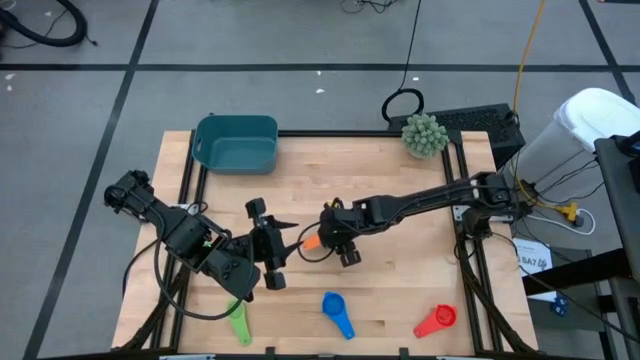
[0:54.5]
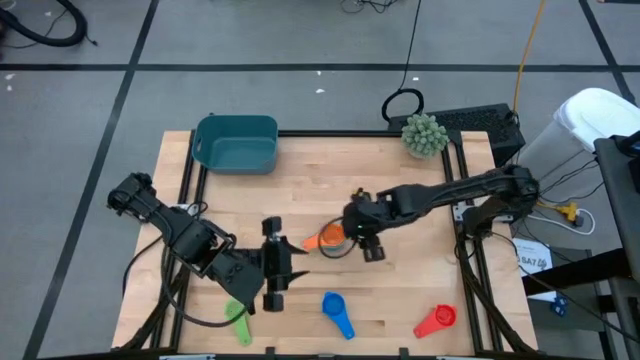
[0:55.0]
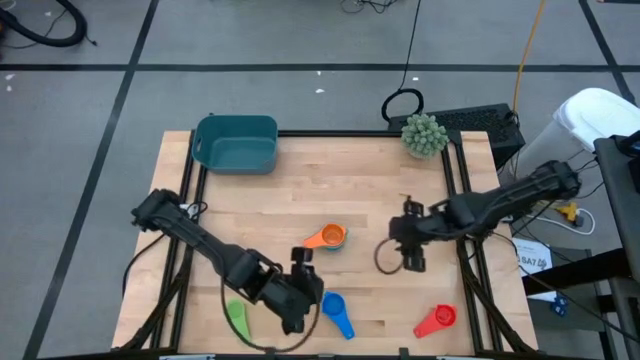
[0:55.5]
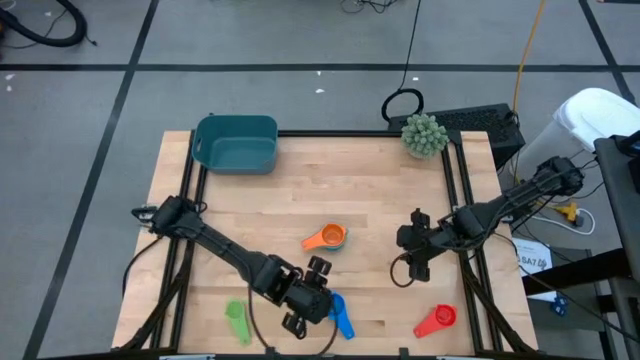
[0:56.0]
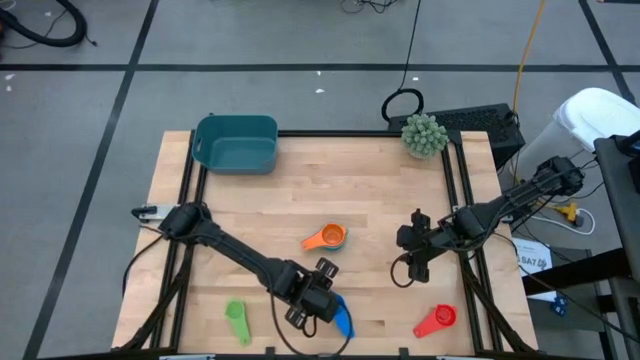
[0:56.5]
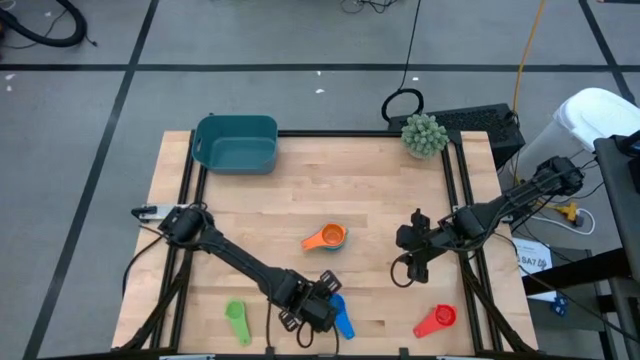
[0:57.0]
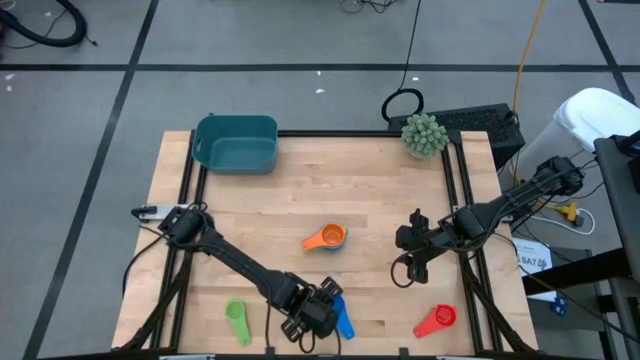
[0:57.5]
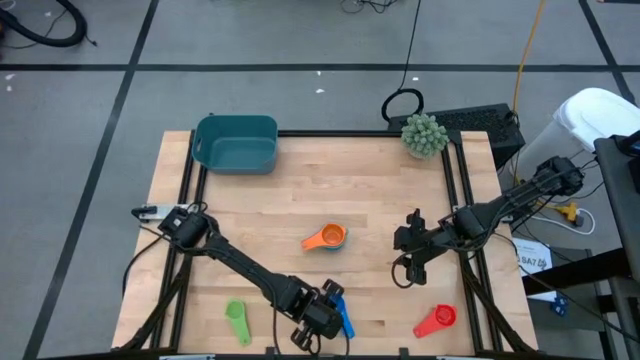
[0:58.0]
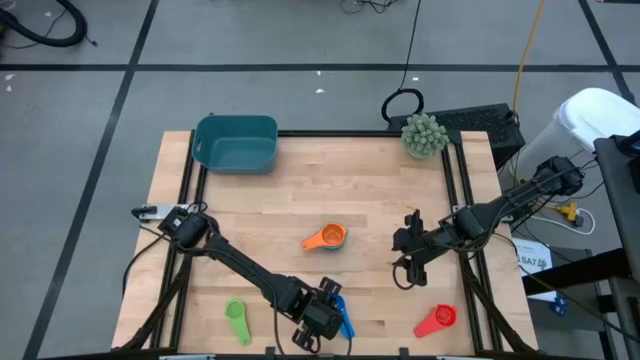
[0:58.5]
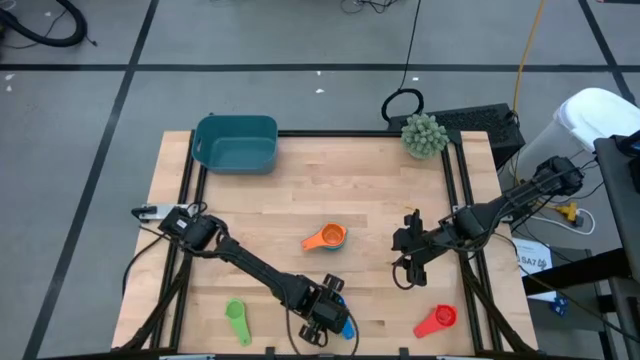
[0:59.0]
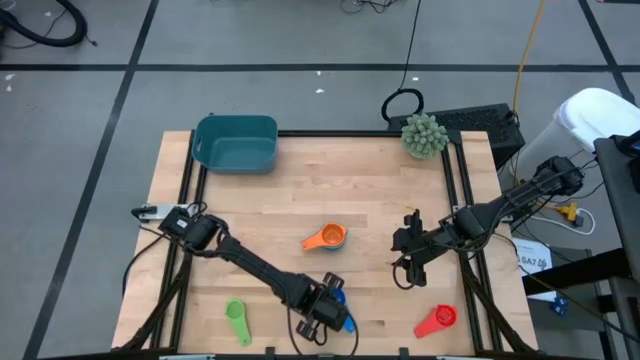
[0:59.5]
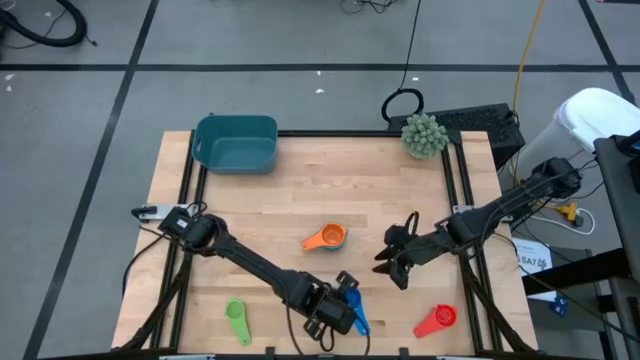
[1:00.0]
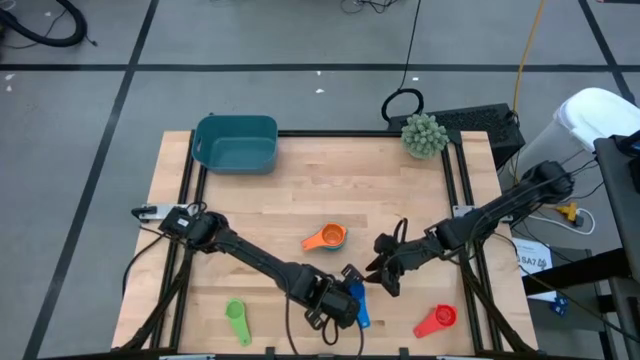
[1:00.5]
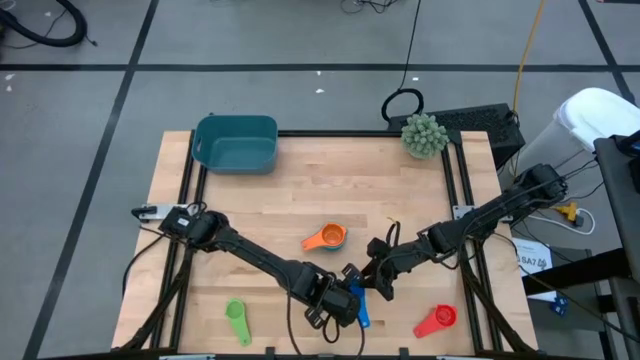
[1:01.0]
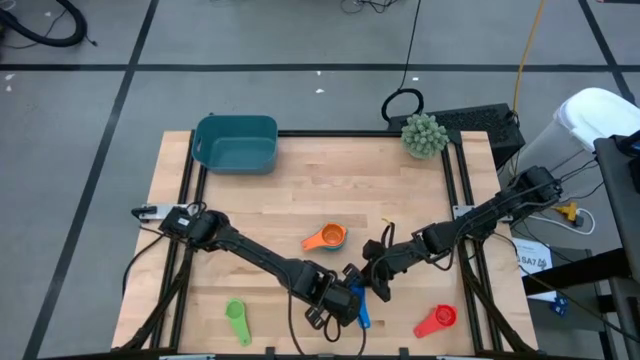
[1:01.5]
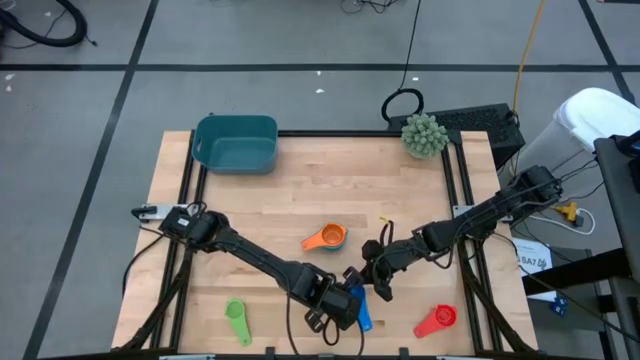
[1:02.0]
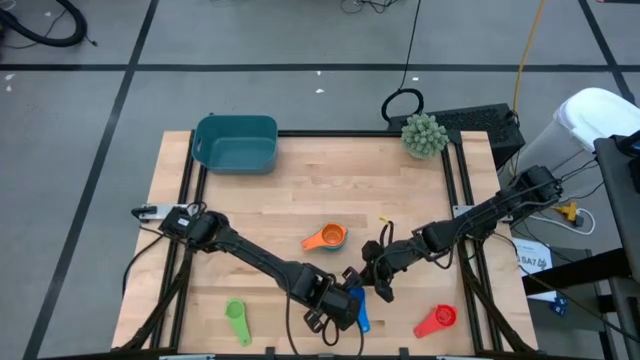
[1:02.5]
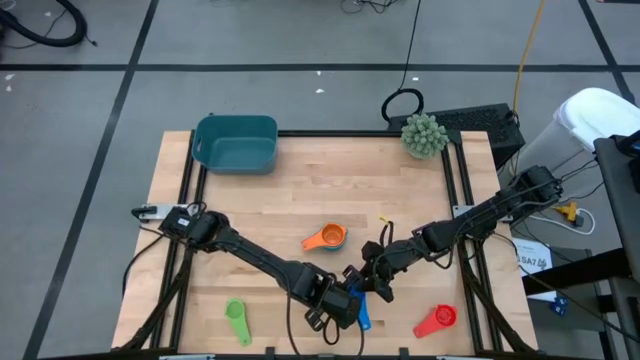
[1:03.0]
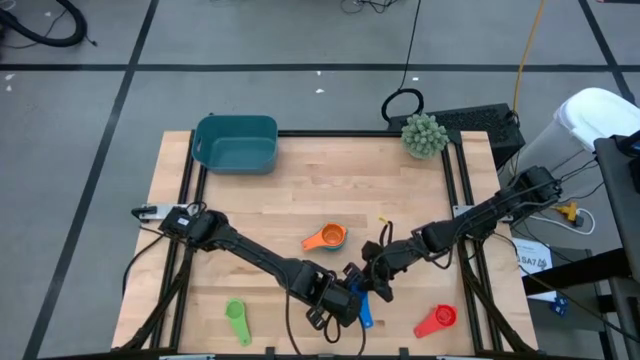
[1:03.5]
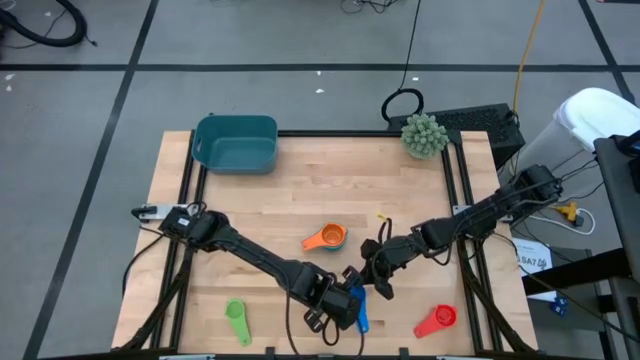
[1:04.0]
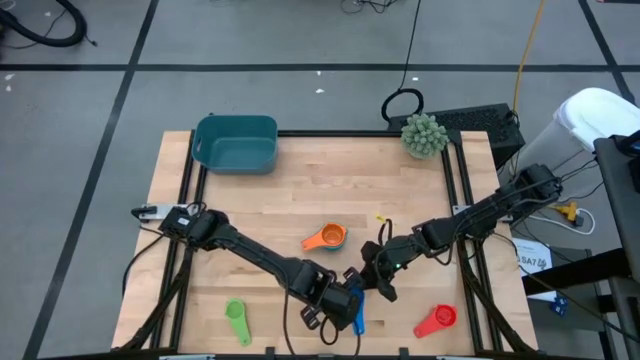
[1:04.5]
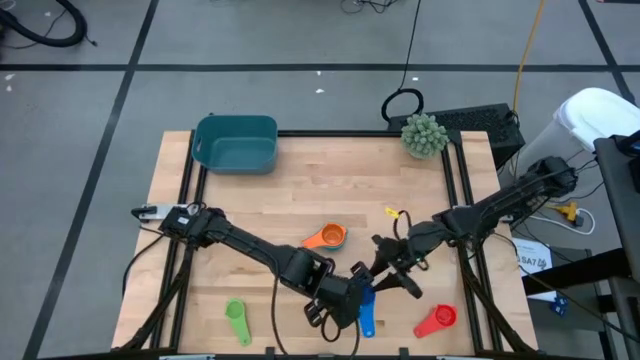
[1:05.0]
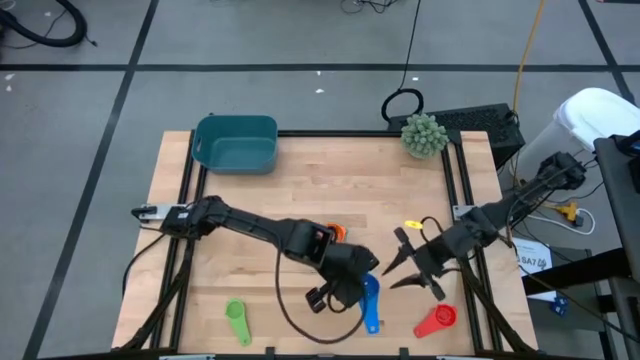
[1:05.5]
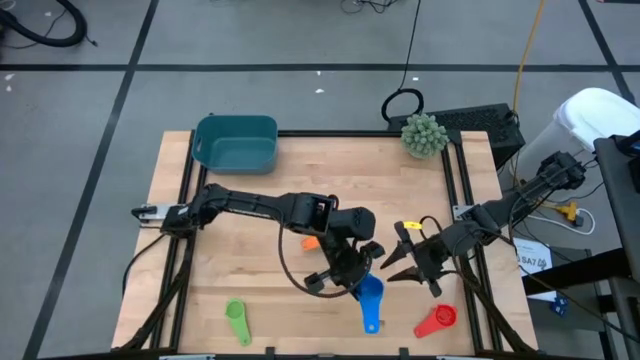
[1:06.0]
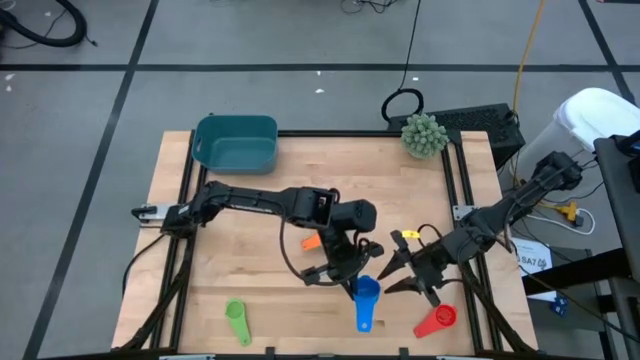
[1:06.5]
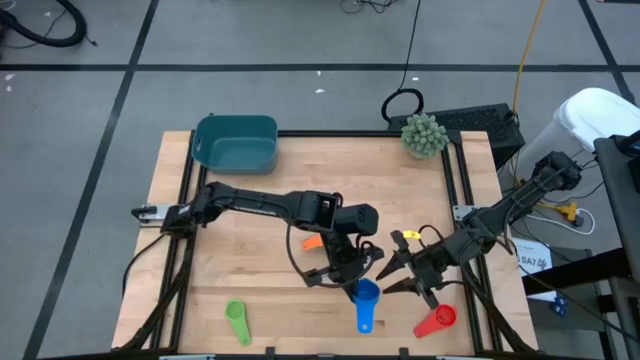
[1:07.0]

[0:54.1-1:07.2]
Task: Nest measuring cups in basket
Stack the blue measuring cup on top of the orange measuring cup

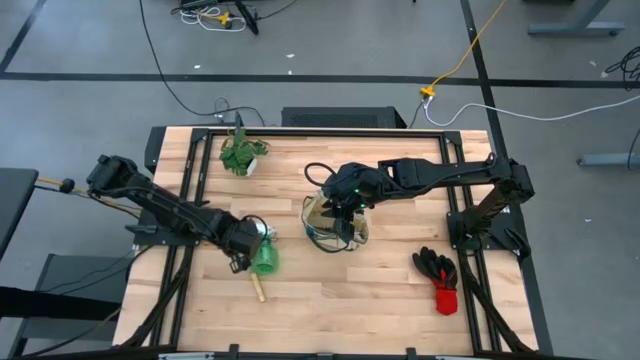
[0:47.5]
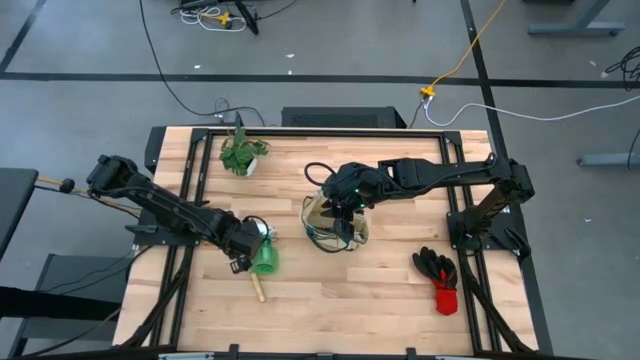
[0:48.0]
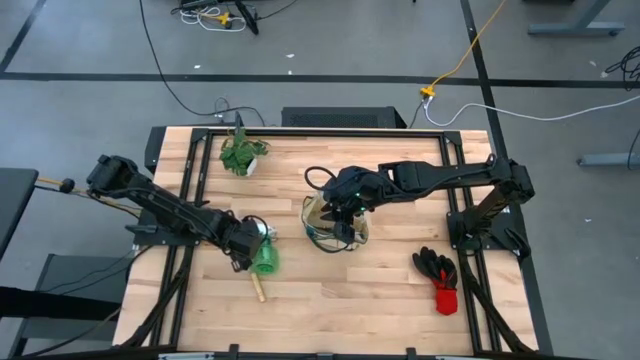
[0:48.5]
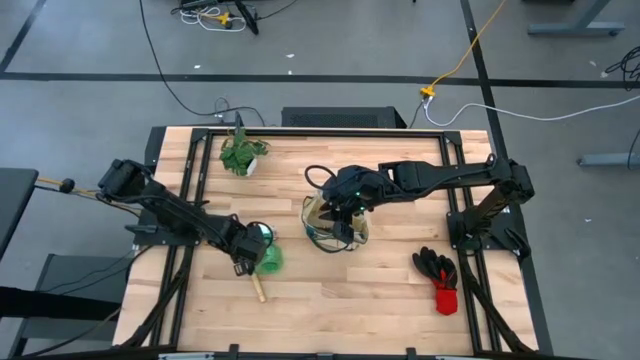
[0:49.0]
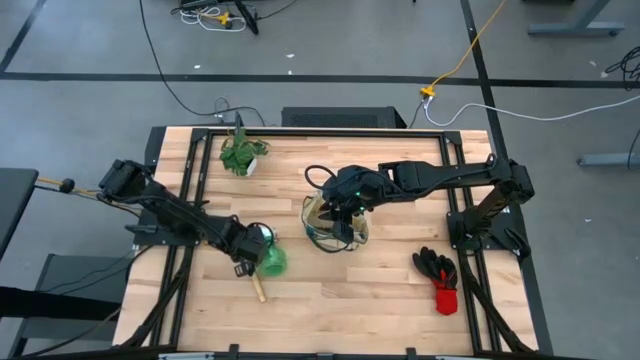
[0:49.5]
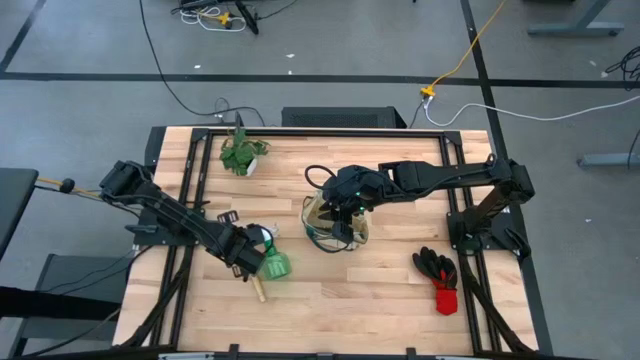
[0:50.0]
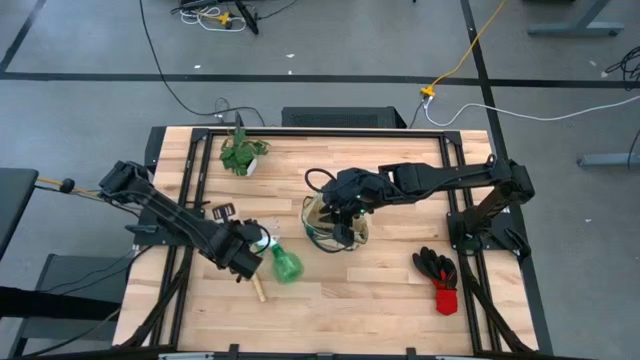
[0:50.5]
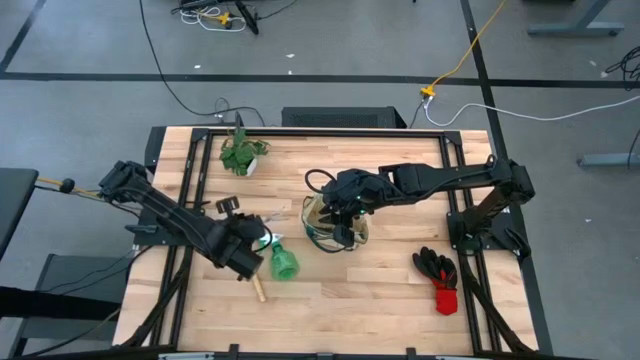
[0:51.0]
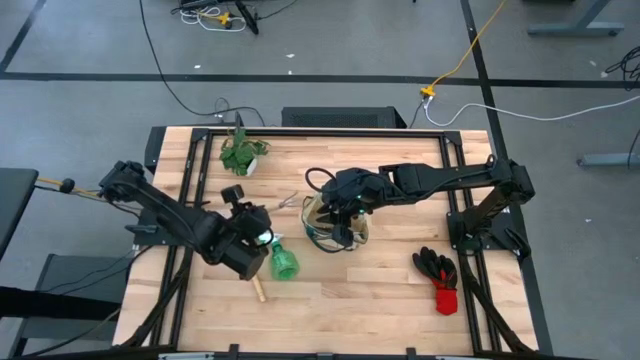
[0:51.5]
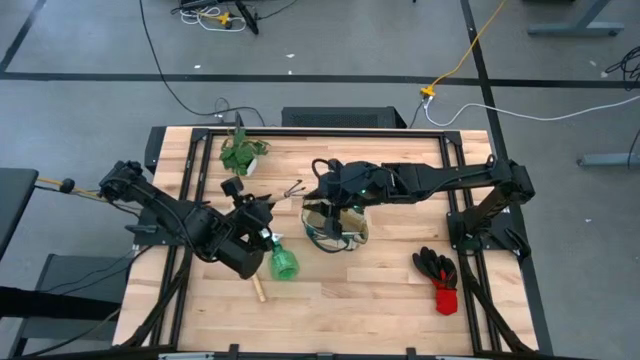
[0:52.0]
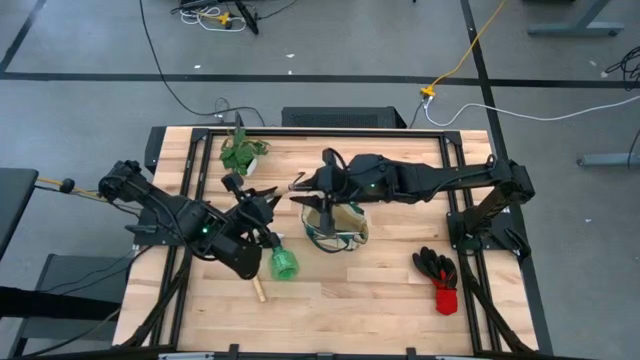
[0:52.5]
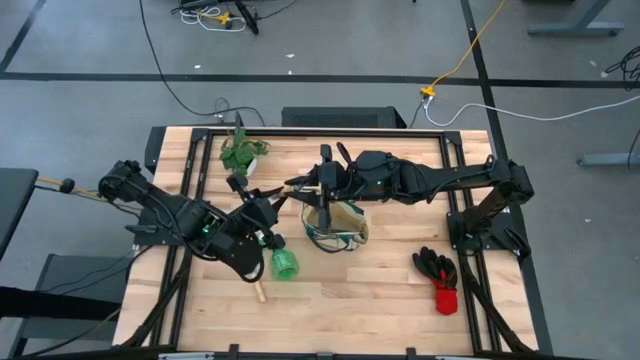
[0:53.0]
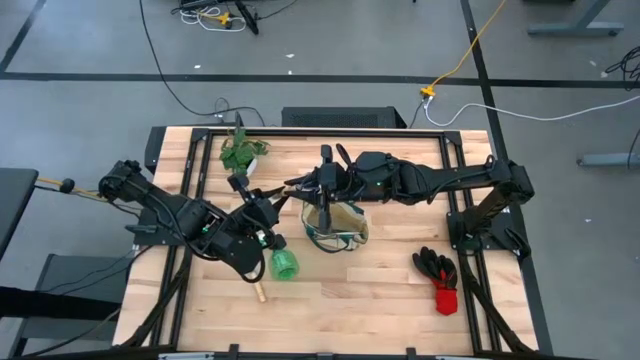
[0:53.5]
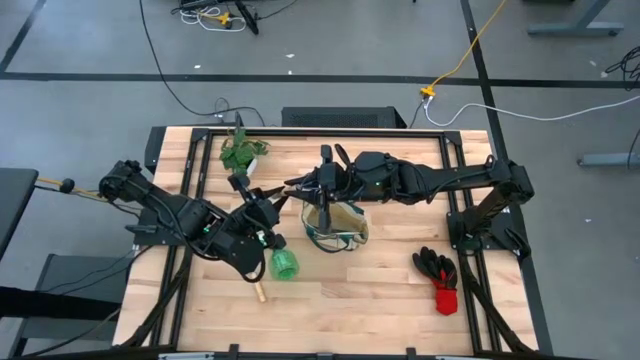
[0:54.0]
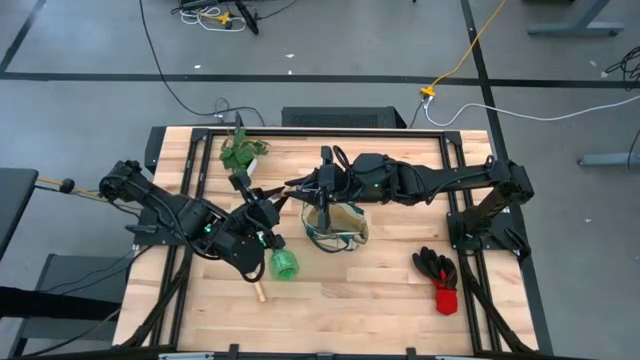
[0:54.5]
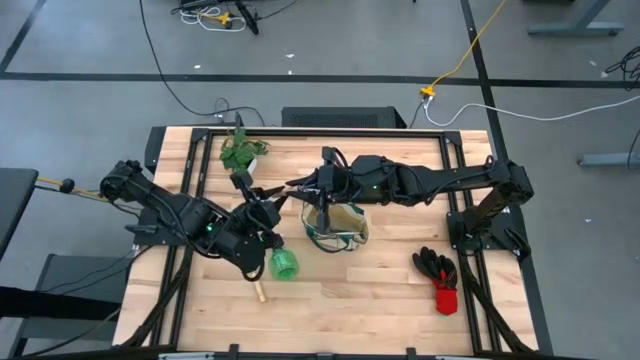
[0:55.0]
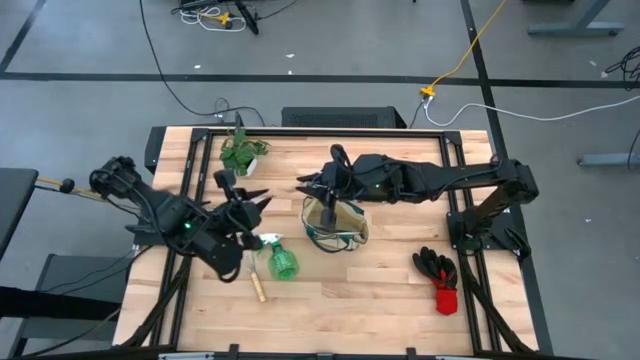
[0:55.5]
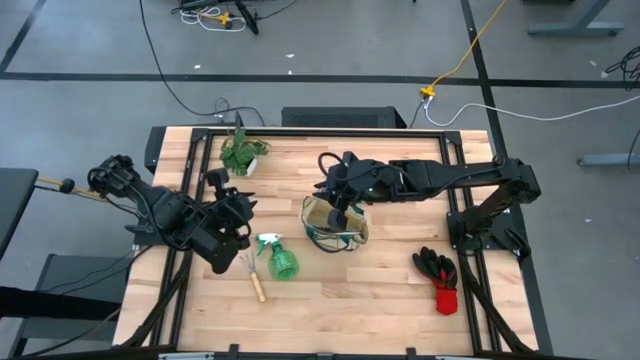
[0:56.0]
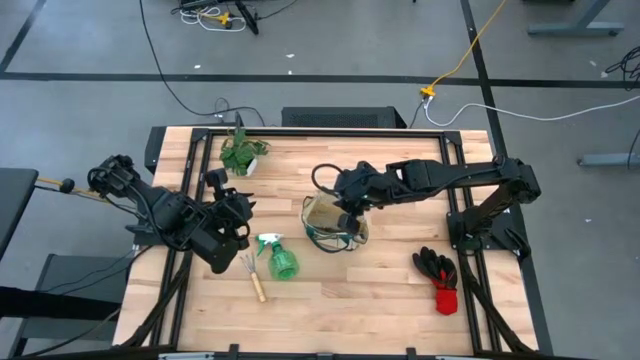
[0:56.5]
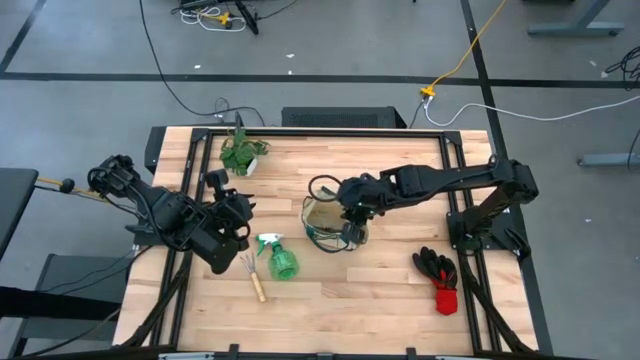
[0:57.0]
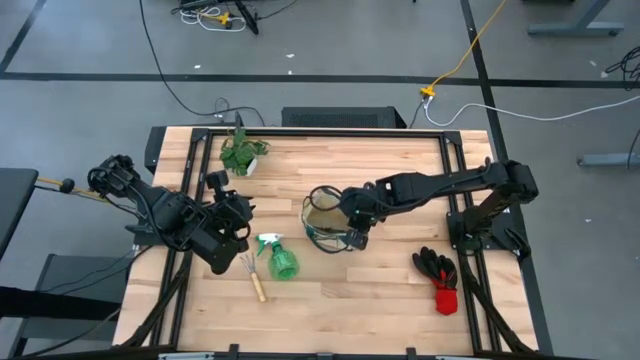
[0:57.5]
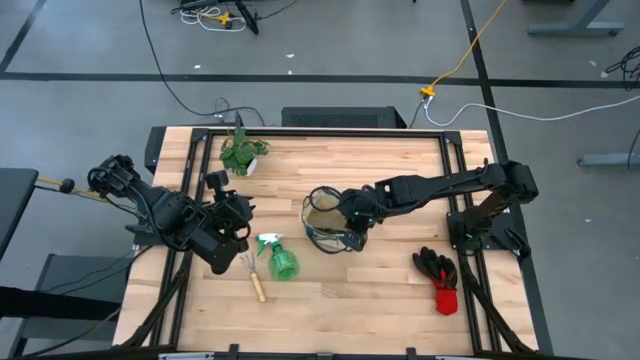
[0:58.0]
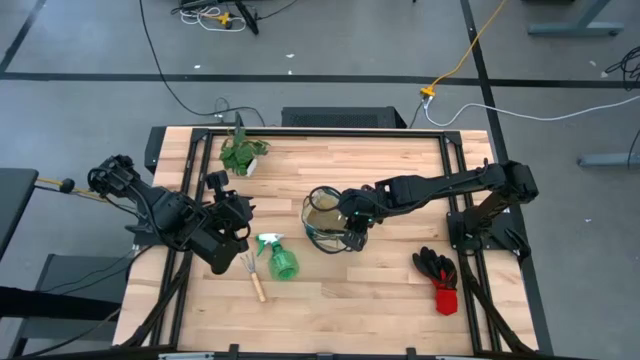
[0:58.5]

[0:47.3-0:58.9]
Task: Pick & Place Garden tools in Gardening bag
Put the top brown hand rake into the white gardening bag
